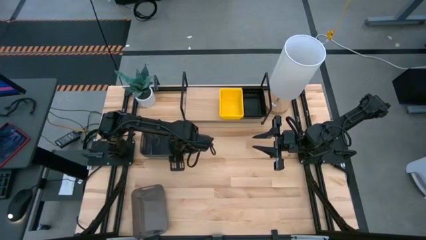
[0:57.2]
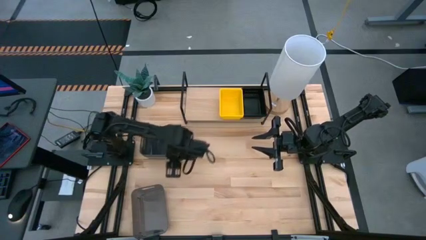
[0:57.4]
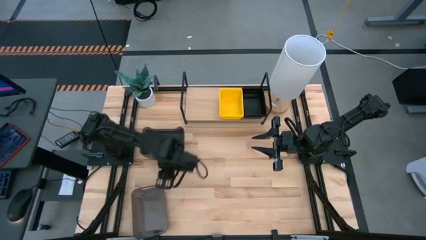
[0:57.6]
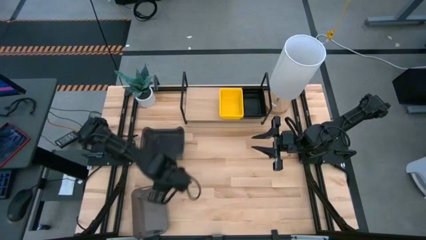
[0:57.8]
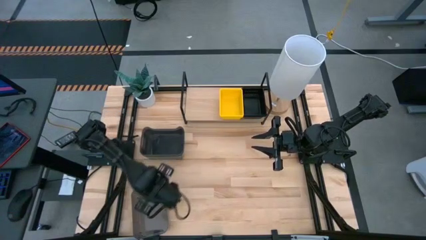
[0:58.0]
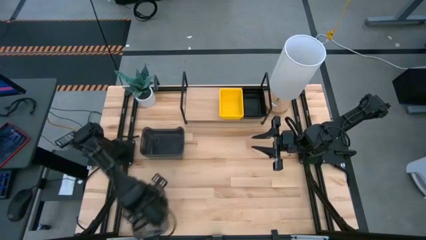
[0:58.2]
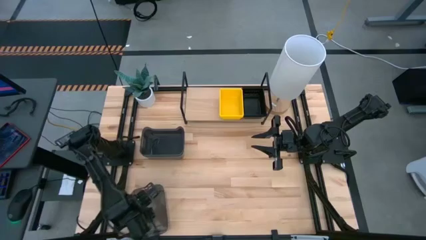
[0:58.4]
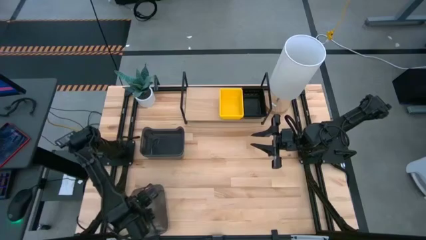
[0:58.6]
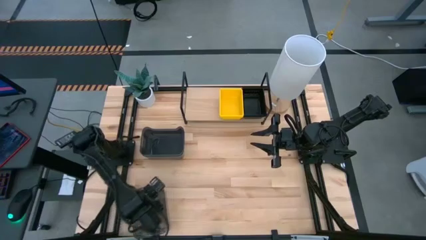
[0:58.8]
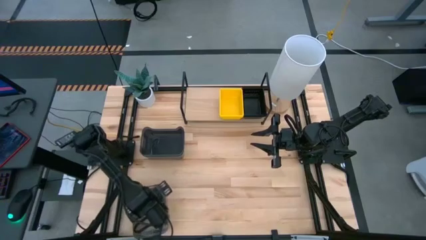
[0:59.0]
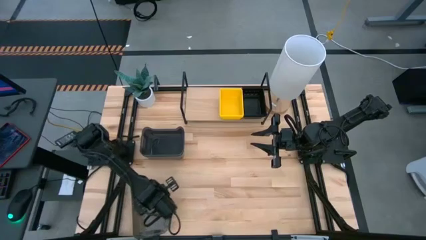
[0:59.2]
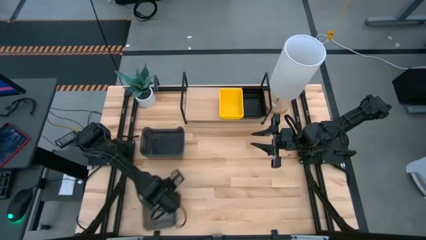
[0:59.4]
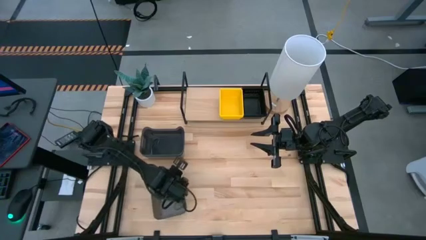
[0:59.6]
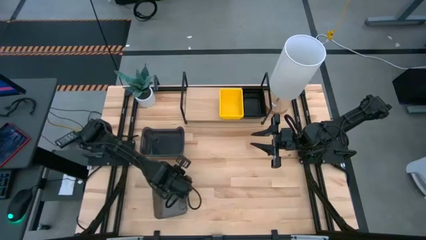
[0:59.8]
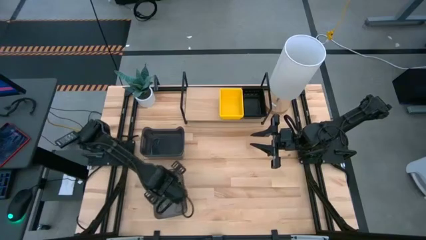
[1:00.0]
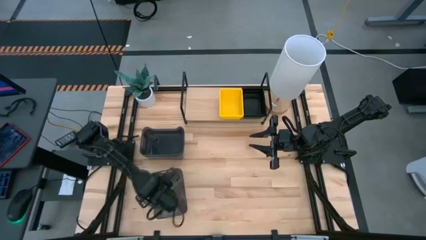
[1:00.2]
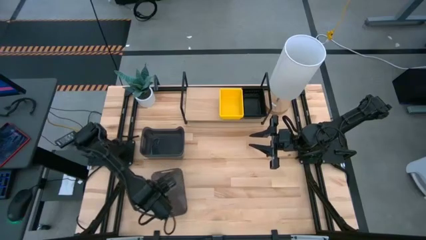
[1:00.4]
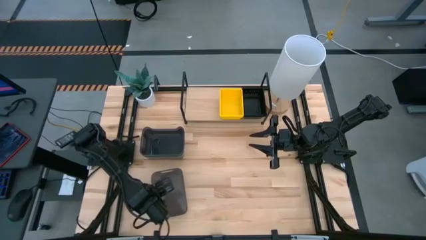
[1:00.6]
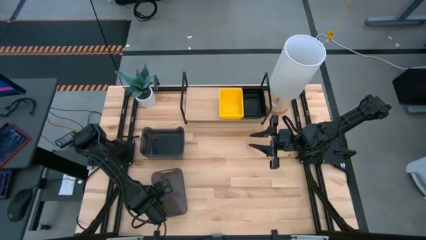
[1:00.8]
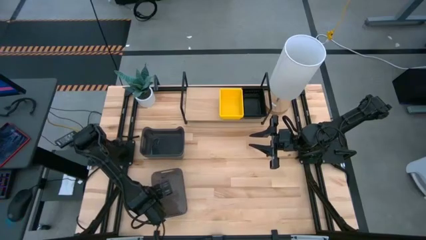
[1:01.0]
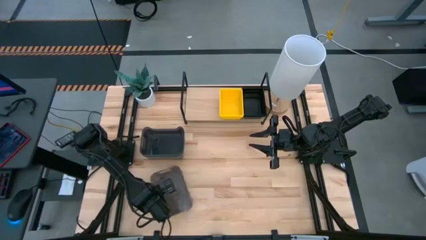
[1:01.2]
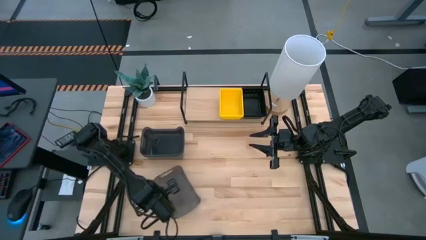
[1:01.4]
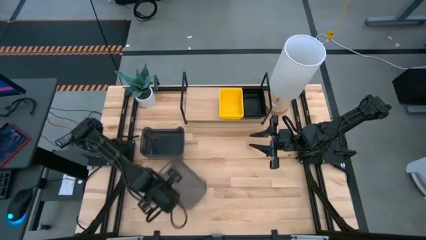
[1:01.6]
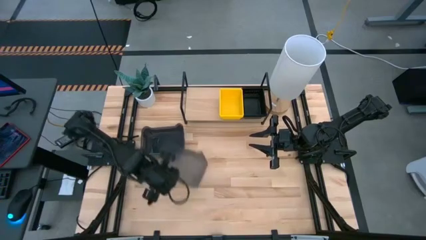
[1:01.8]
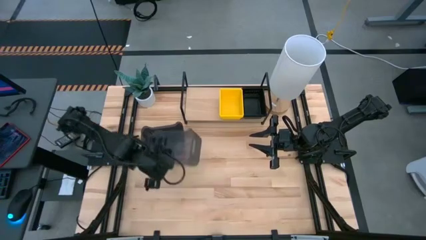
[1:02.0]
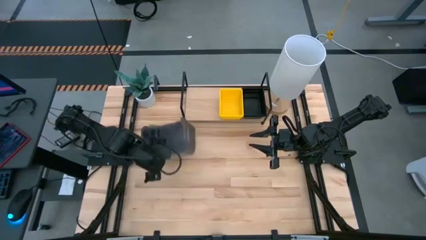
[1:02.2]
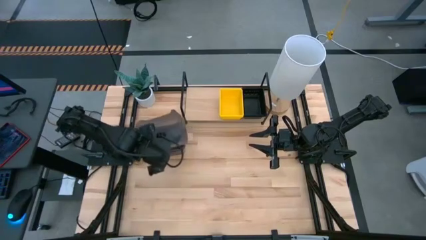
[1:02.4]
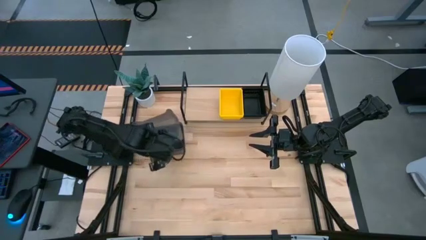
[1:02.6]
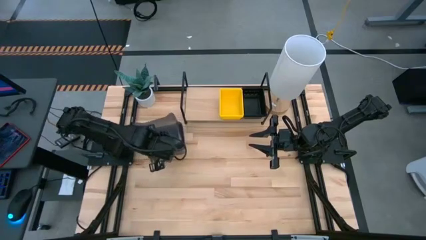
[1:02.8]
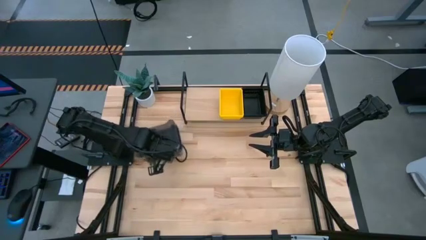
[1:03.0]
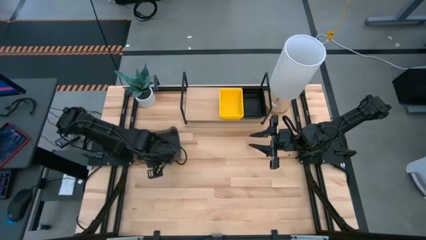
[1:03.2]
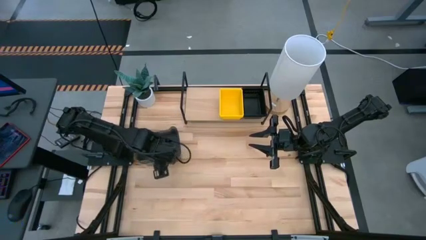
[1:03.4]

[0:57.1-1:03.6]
Task: Stack baskets on shelf by color
Stack the bottom gray bin on the top gray bin

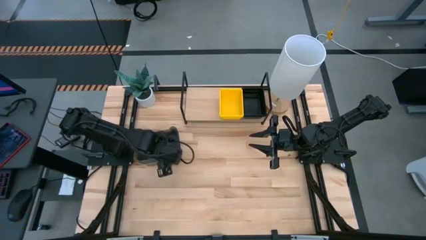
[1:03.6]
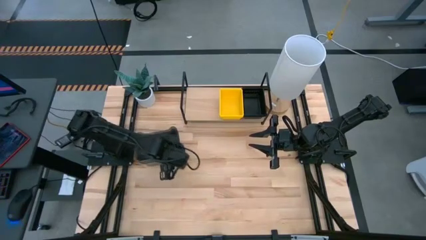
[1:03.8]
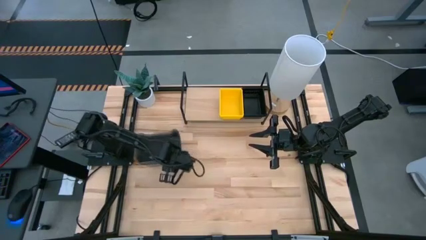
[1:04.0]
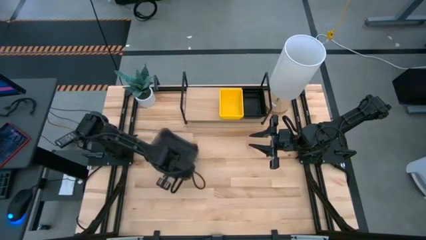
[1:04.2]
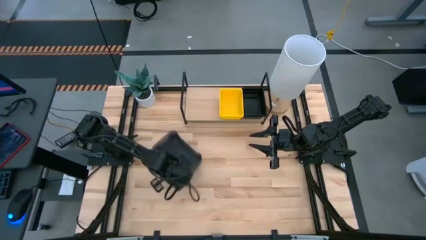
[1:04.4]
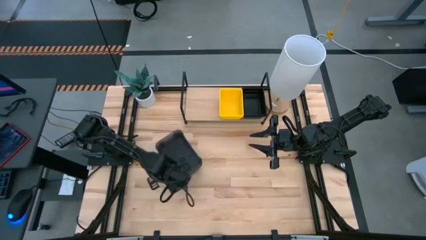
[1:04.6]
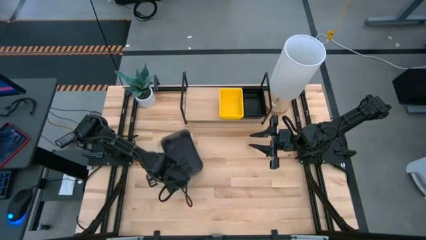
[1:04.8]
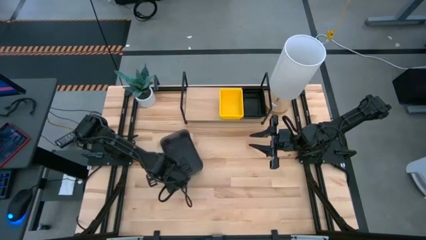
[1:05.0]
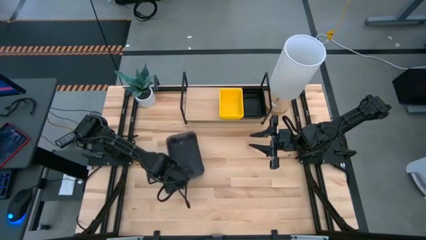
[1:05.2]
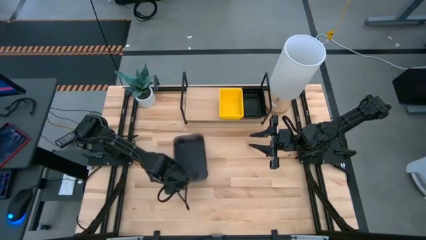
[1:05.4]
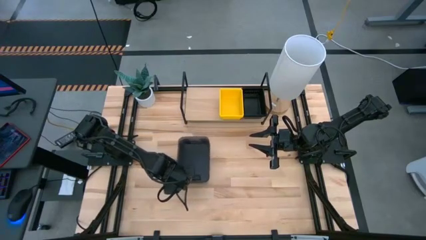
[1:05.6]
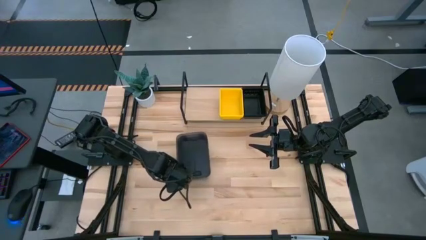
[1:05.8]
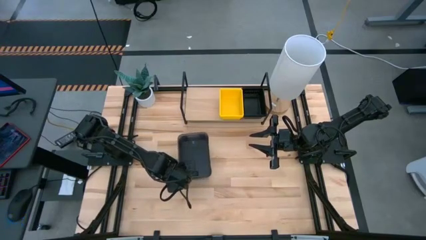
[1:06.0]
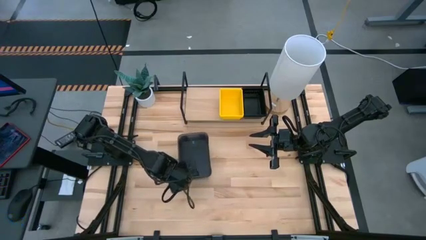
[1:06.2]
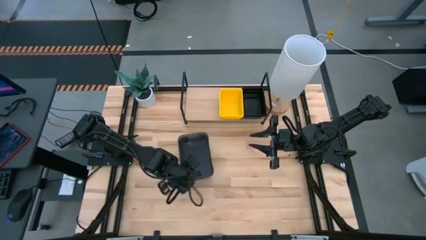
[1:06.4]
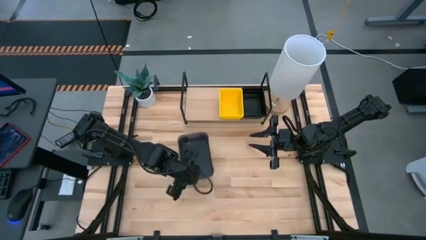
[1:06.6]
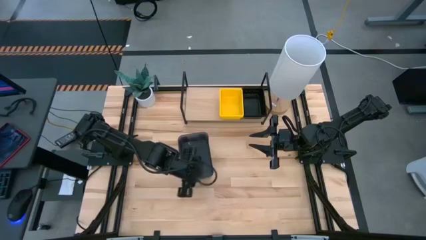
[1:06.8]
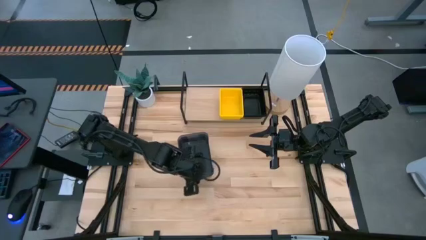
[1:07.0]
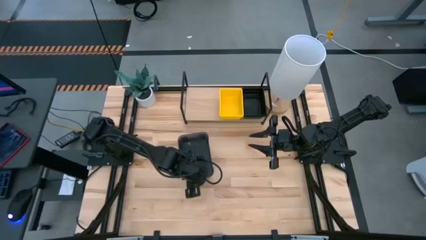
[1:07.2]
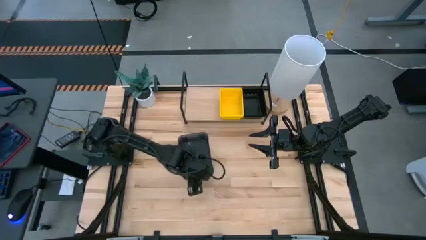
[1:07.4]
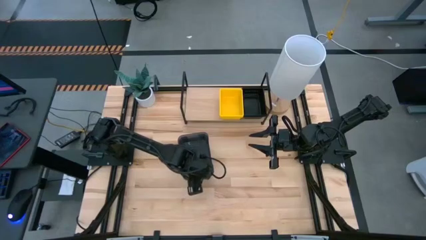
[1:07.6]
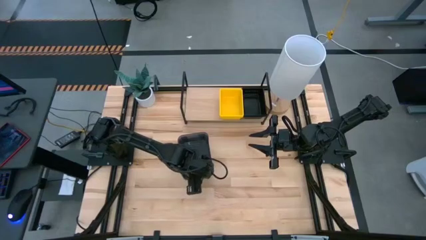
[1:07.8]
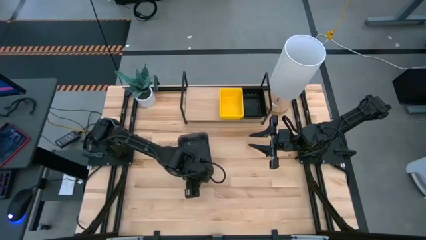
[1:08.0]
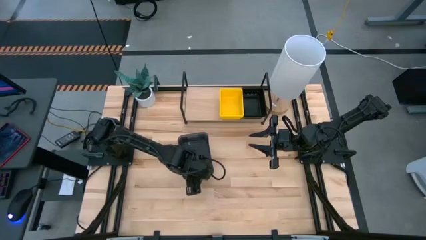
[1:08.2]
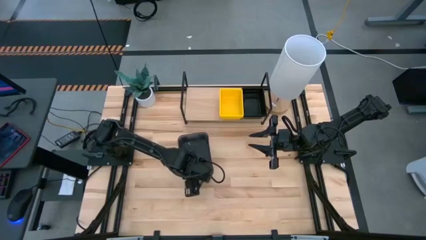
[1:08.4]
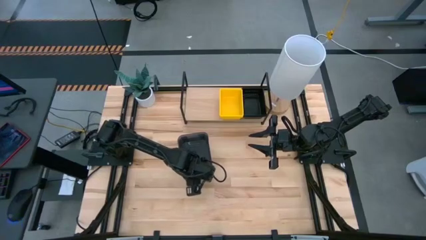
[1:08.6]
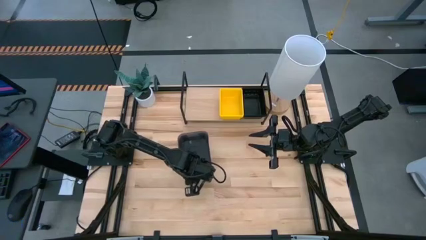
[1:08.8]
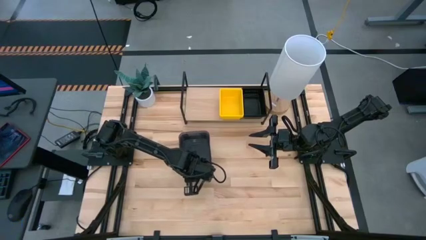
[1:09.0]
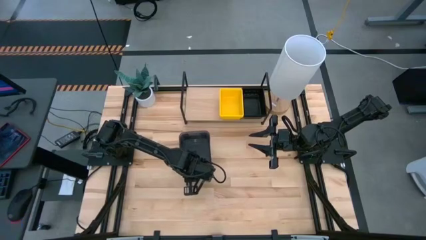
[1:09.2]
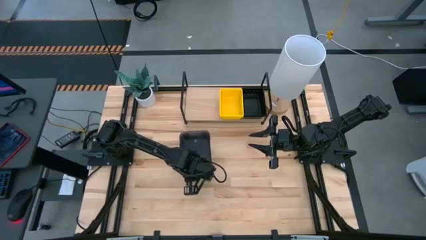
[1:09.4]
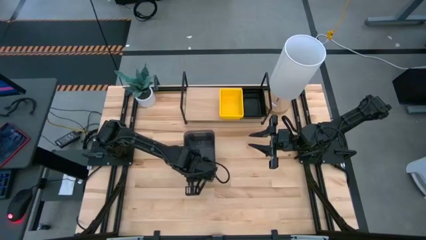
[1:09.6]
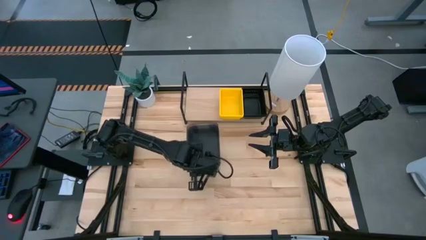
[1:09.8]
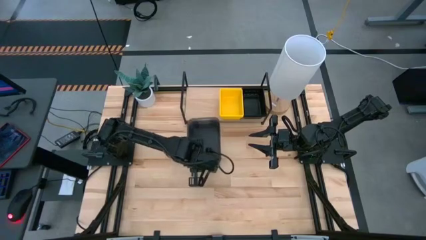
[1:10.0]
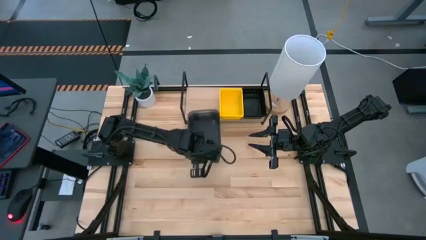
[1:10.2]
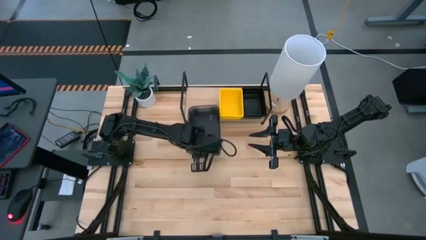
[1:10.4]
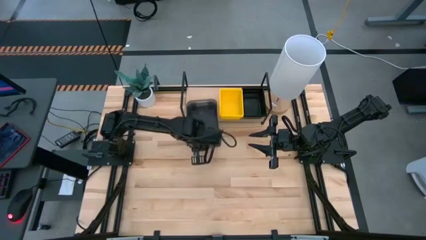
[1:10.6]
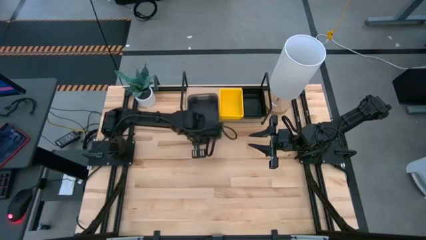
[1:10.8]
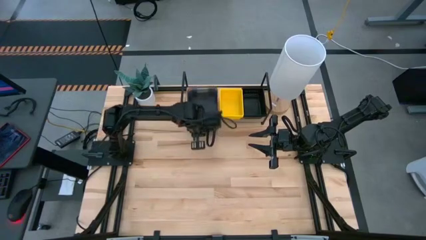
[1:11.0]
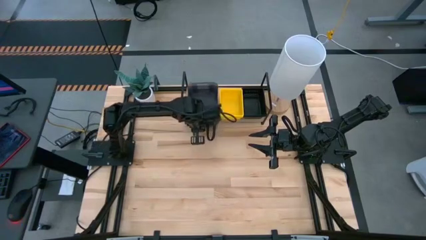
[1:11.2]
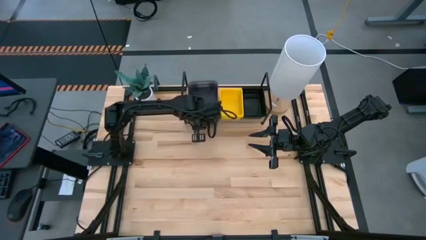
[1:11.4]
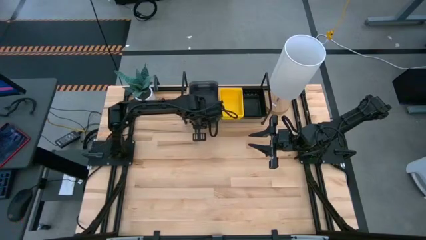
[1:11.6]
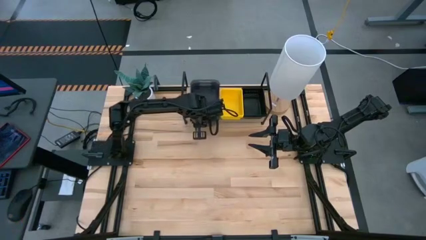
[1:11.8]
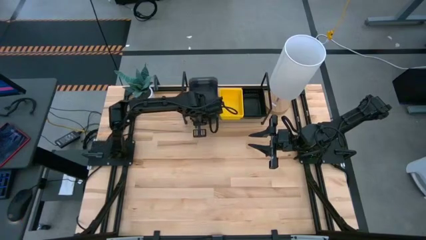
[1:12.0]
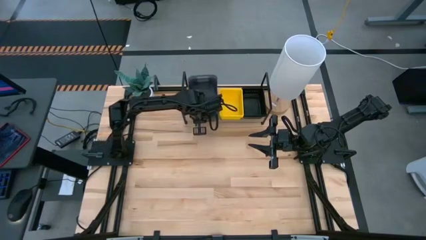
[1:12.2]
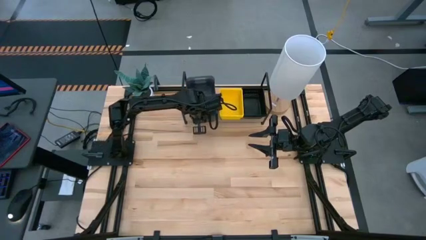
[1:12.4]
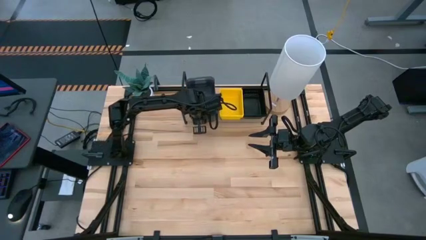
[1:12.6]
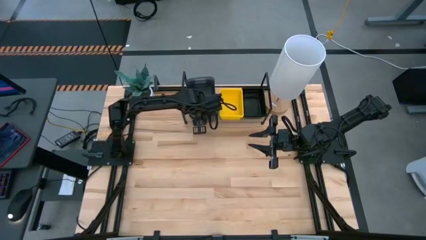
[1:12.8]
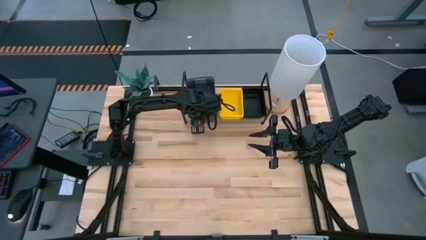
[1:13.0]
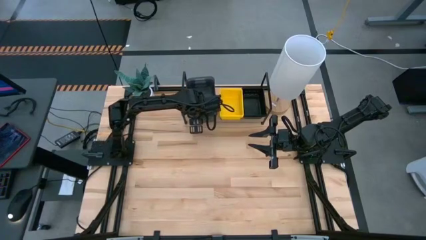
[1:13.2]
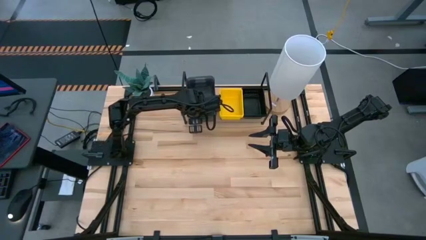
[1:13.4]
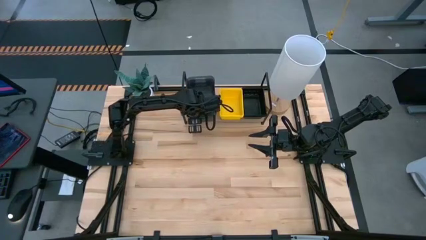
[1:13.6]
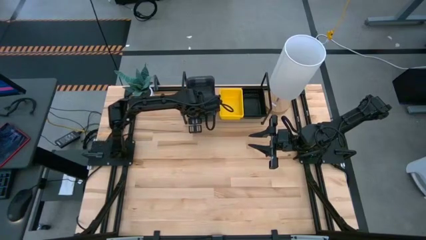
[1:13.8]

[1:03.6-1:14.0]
Put the stacked gray bins on the shelf
